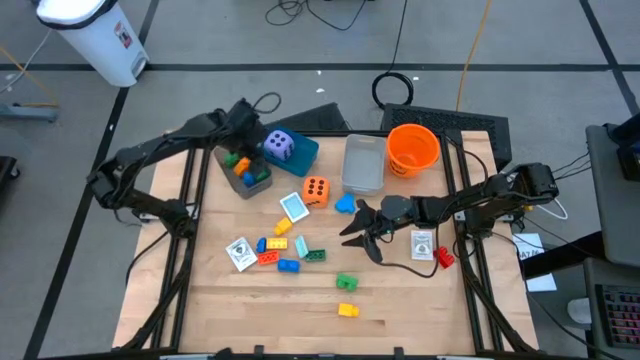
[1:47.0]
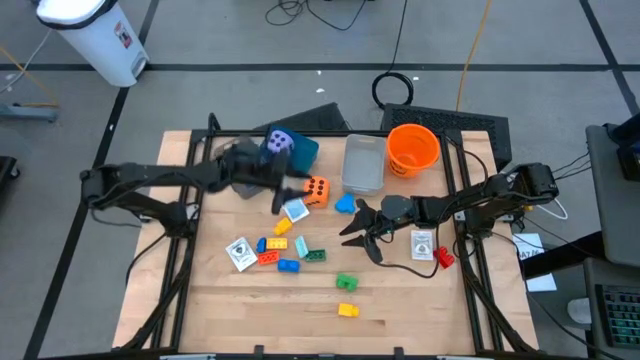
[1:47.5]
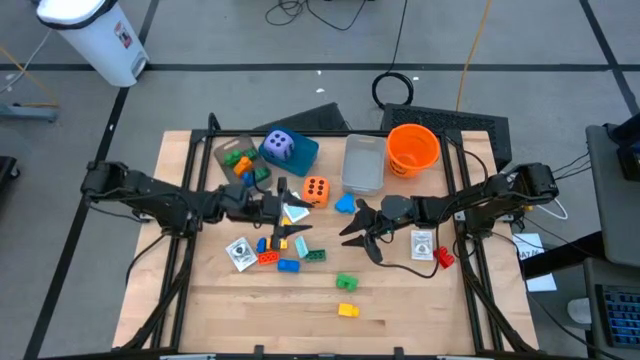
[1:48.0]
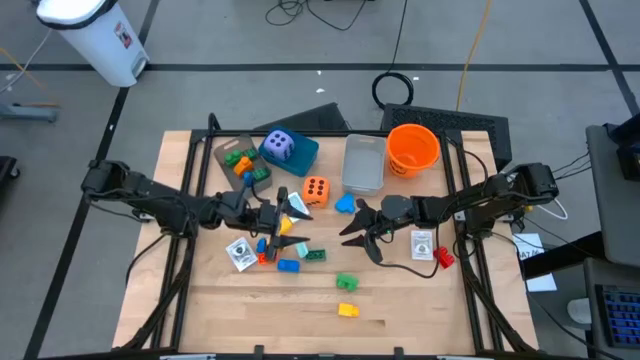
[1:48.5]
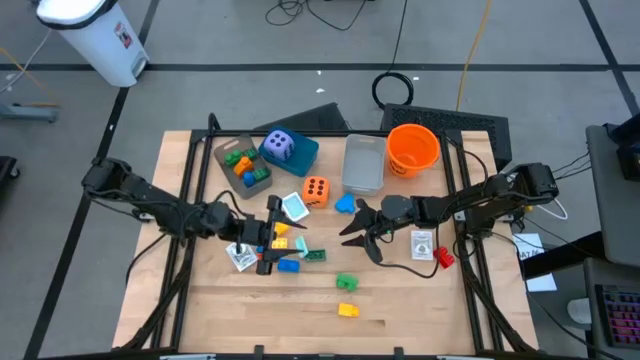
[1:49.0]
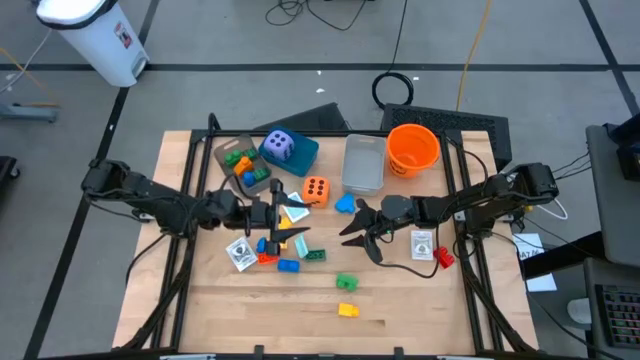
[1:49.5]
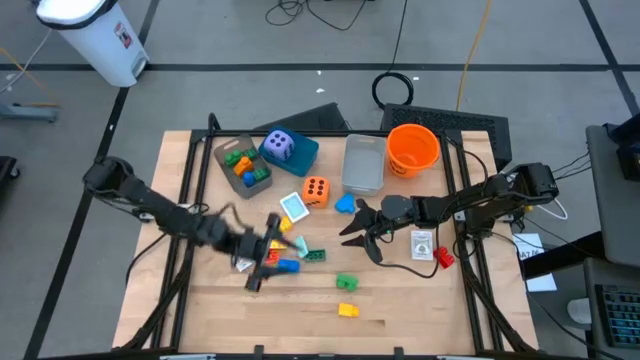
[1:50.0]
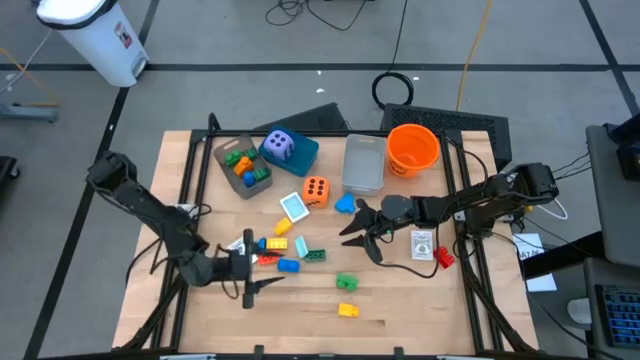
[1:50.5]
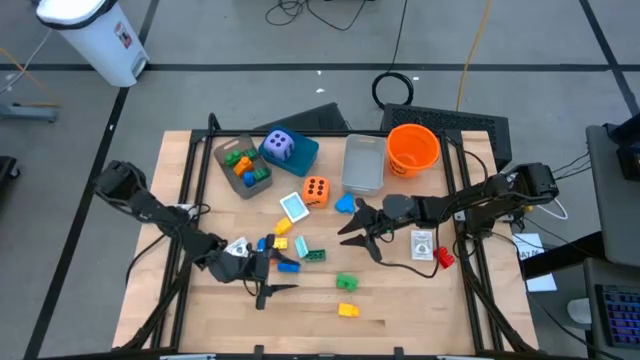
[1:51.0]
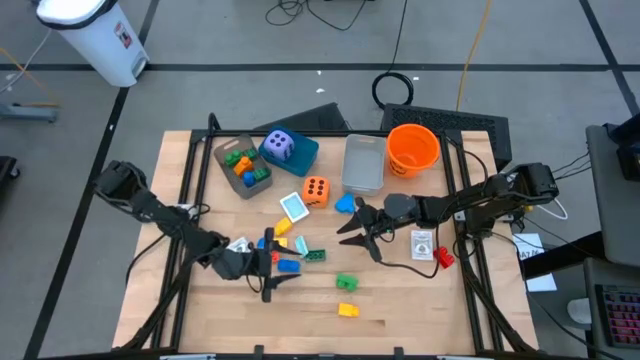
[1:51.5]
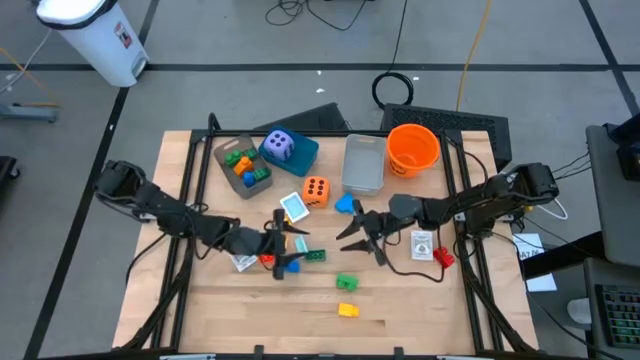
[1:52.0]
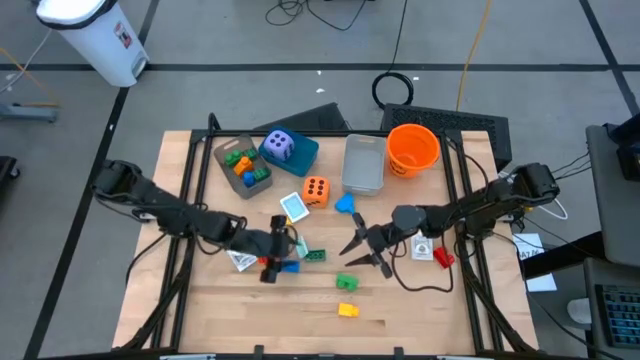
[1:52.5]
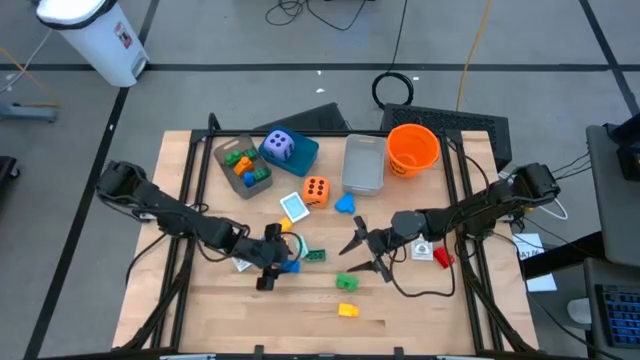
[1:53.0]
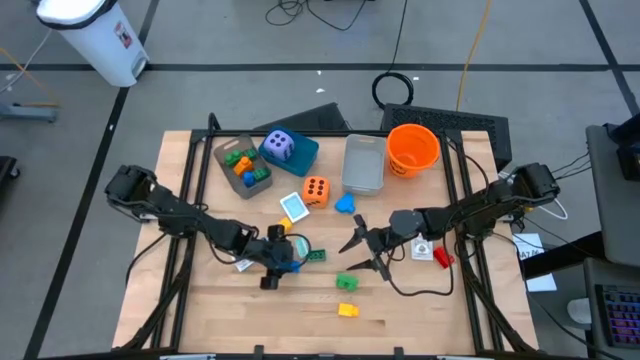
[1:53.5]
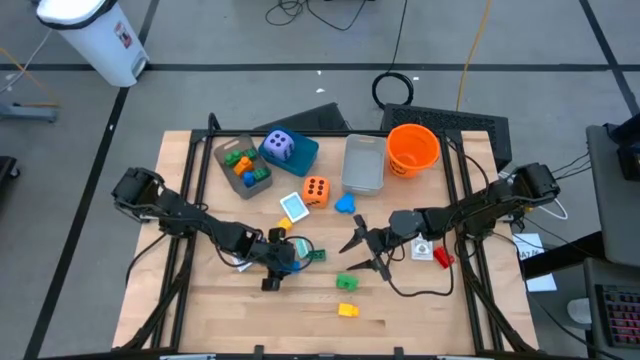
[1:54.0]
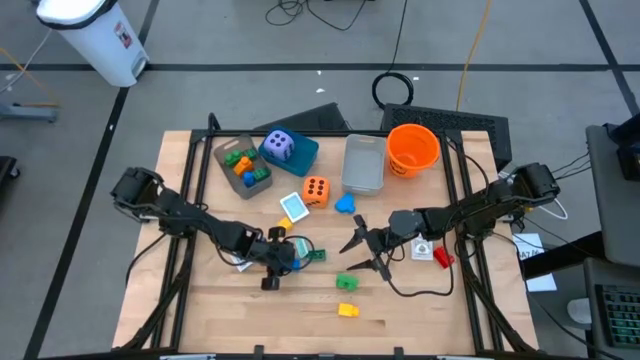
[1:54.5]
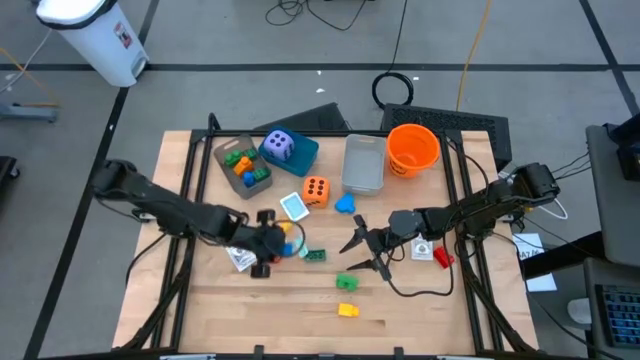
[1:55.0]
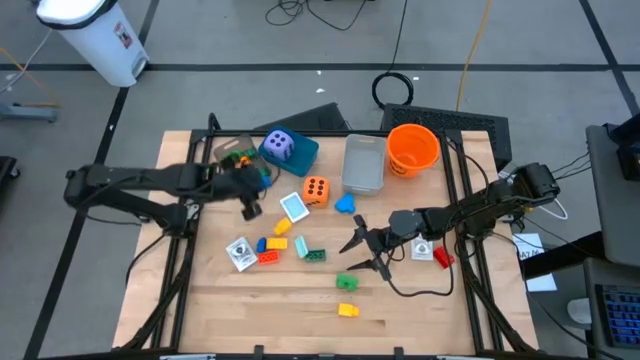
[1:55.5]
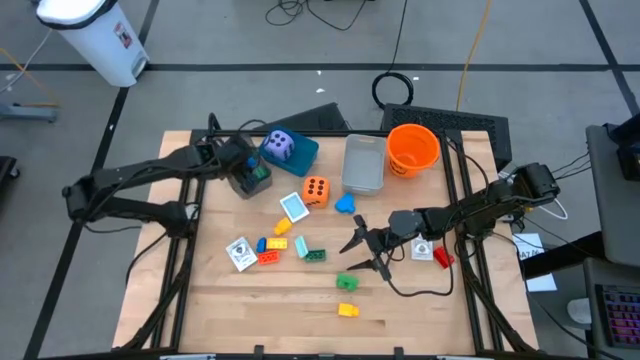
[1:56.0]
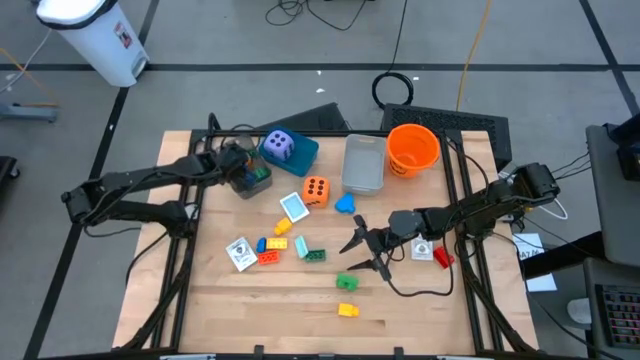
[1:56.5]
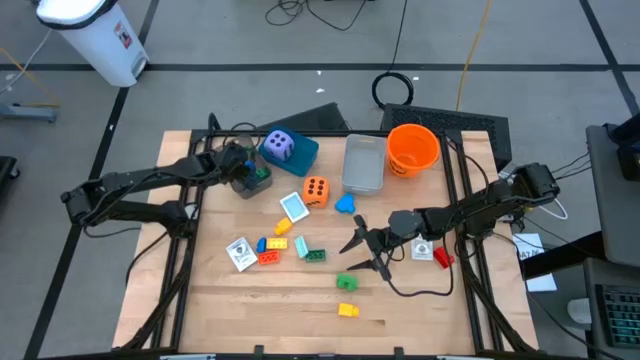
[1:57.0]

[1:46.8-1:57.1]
Task: Pick & Place Toys
Put the blue game piece into the black bin

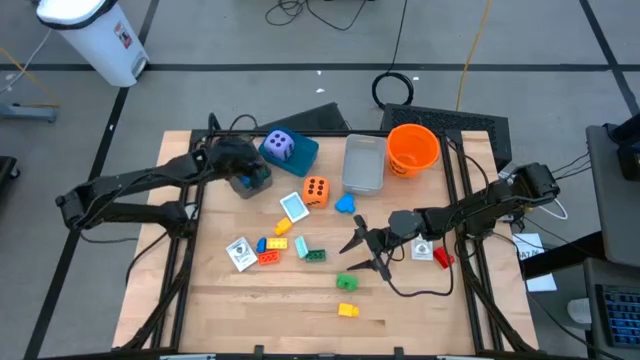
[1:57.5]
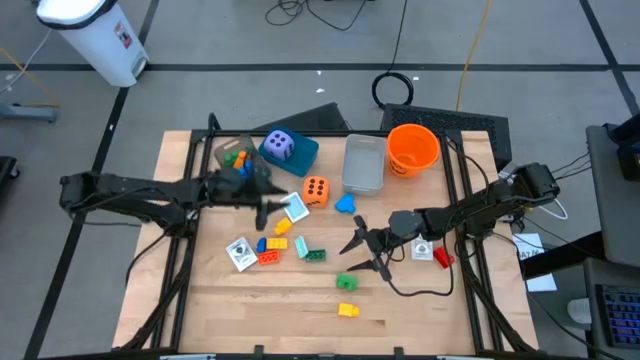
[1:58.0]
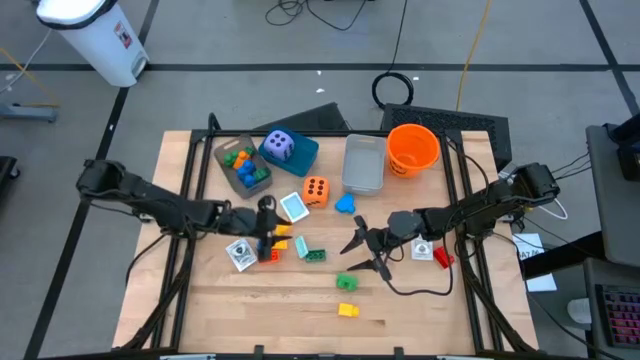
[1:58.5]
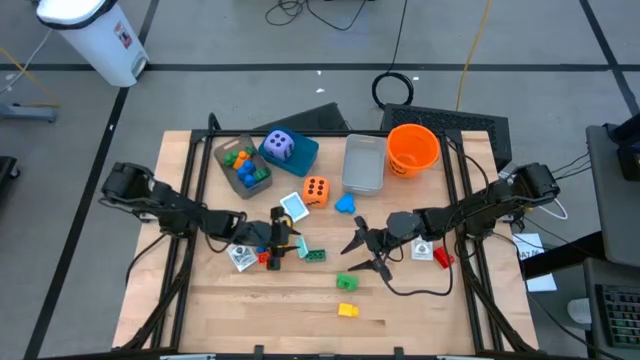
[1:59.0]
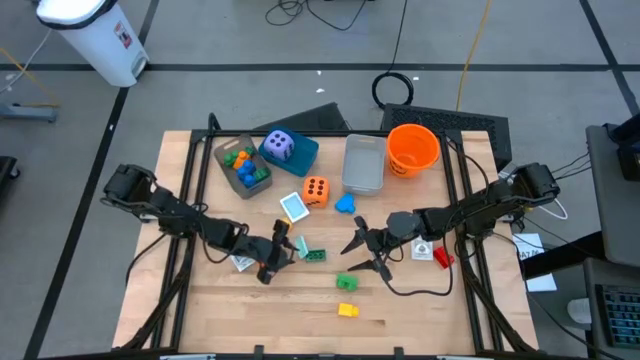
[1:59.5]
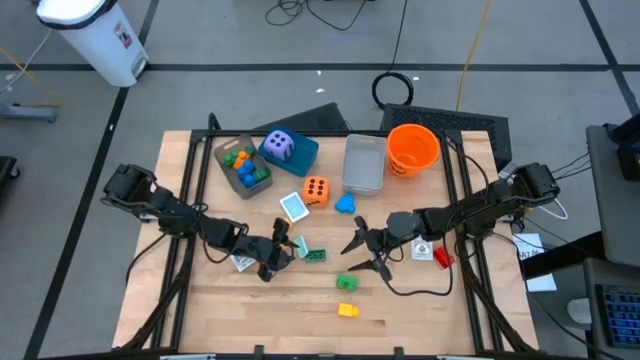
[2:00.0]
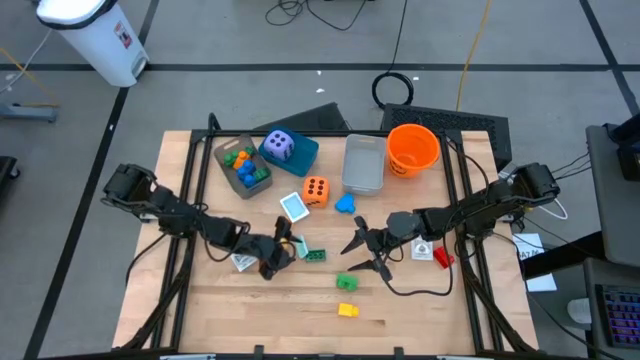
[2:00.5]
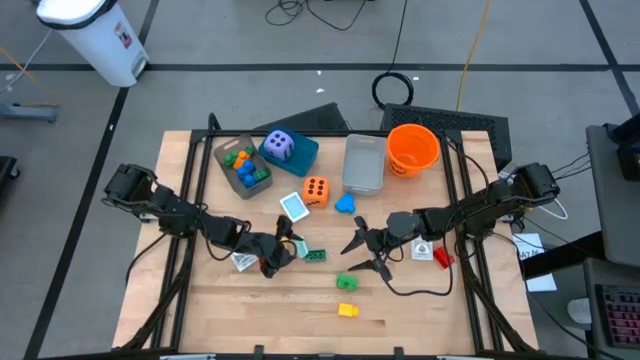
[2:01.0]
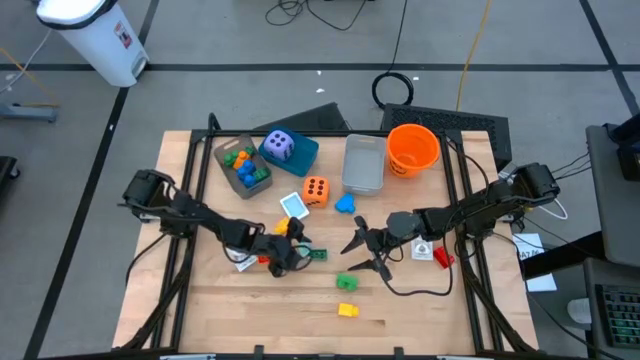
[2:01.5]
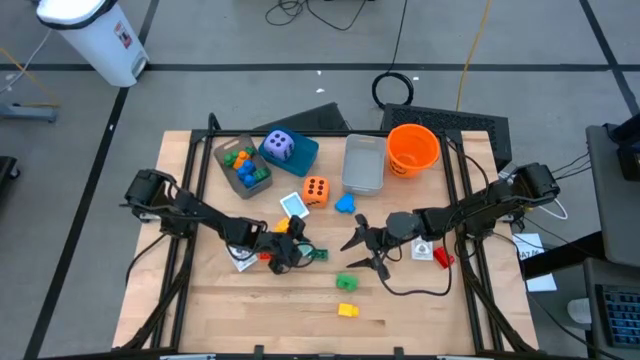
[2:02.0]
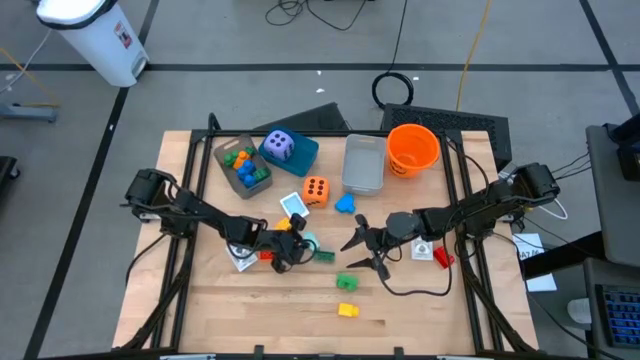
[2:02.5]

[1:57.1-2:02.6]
Put the light blue game piece into the black bin

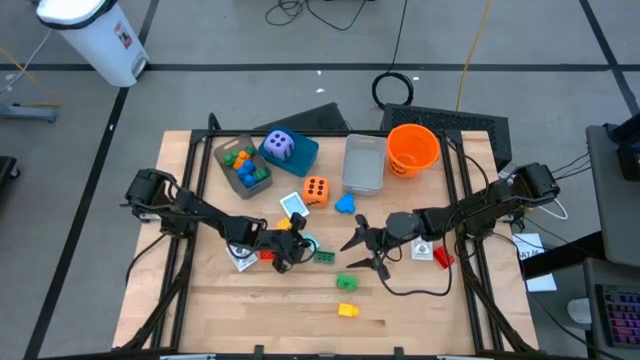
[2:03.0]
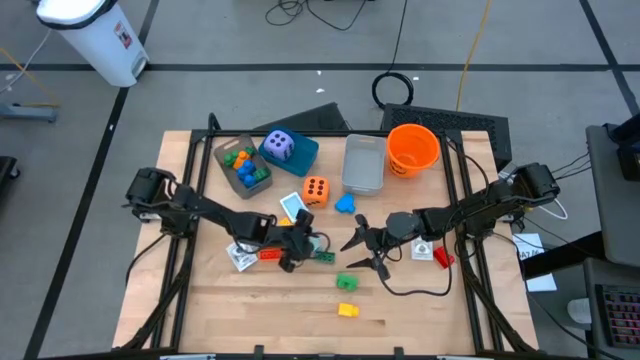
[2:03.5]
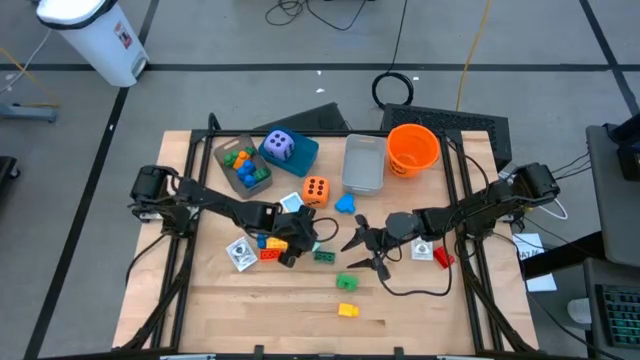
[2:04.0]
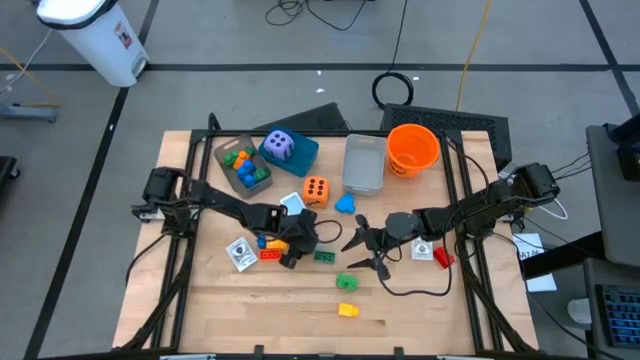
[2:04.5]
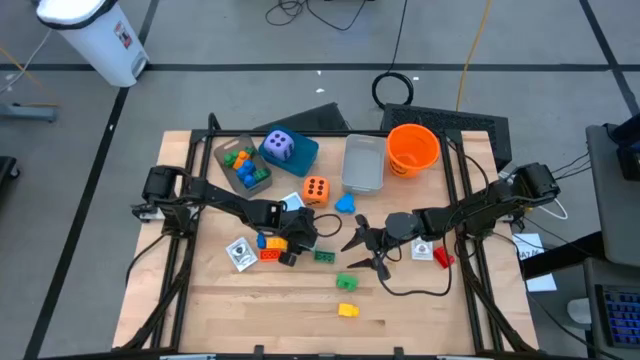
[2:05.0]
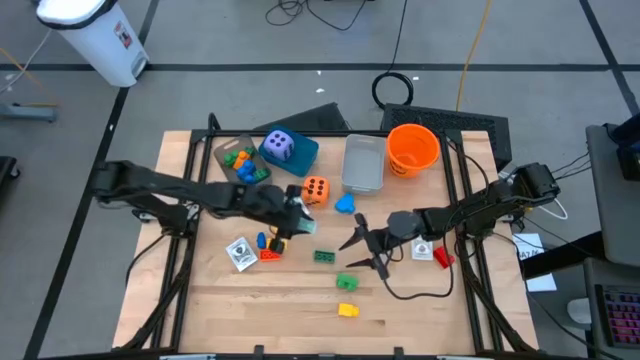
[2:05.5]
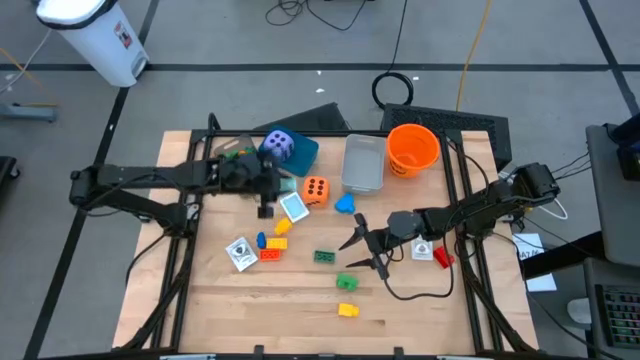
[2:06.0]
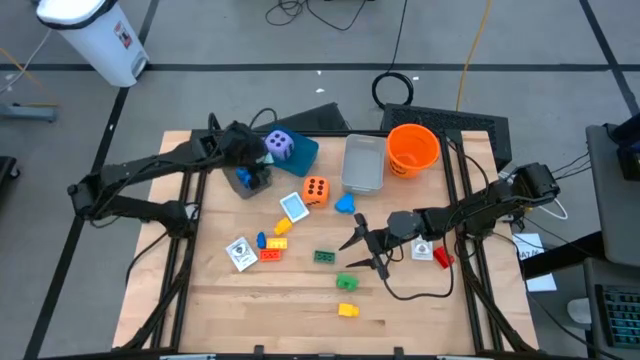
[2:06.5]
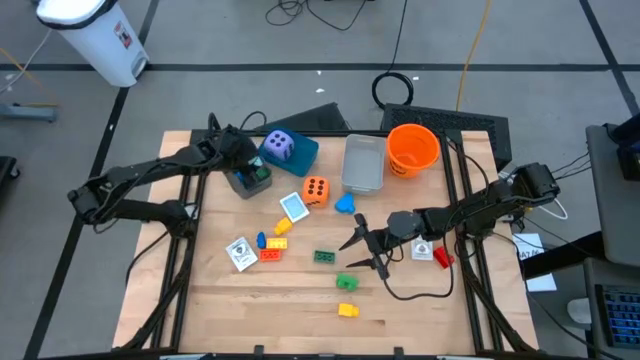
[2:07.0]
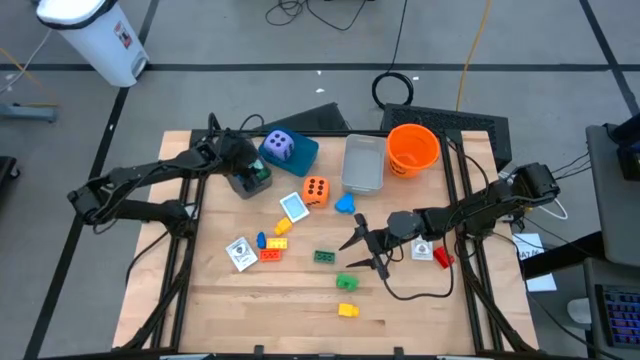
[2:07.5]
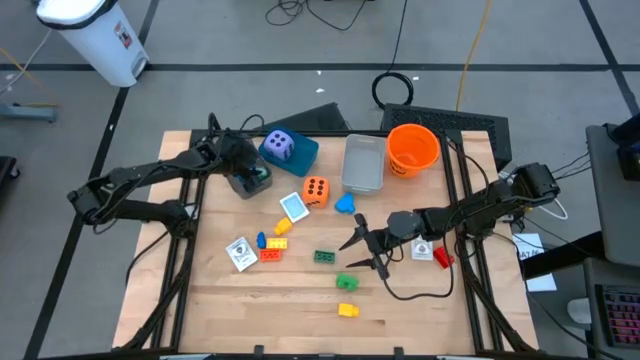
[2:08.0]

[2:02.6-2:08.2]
Put the light blue game piece into the black bin
